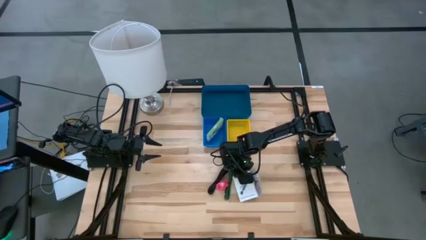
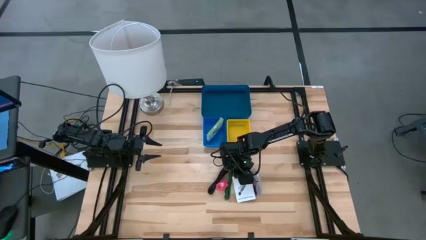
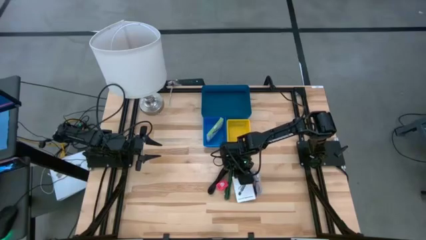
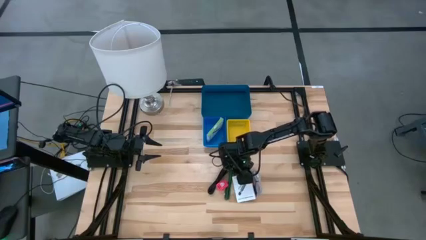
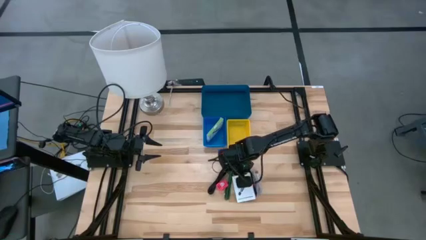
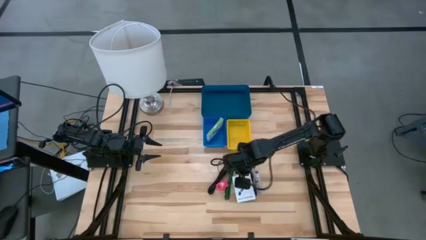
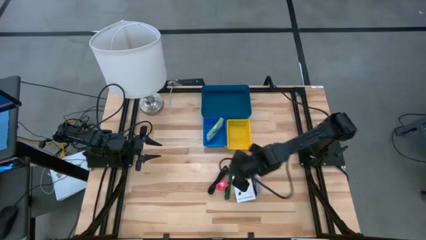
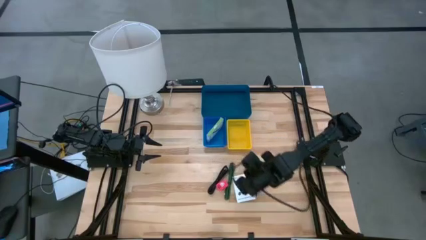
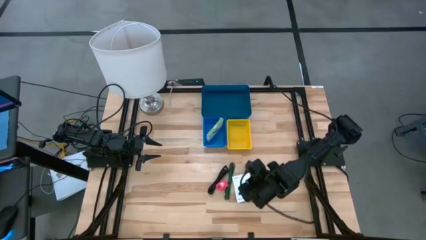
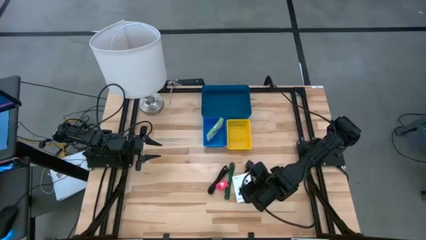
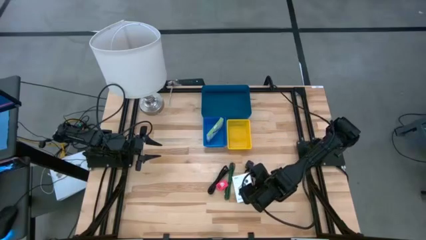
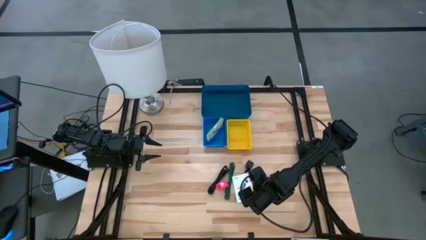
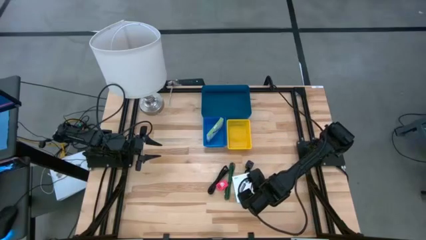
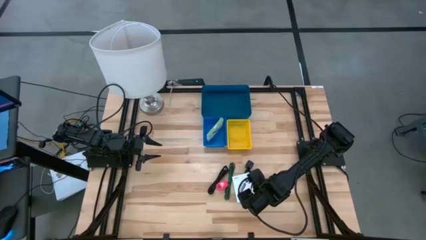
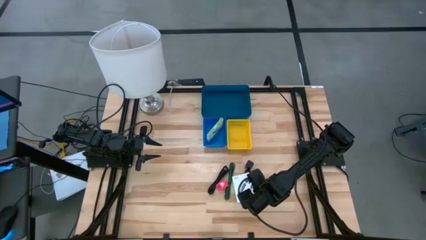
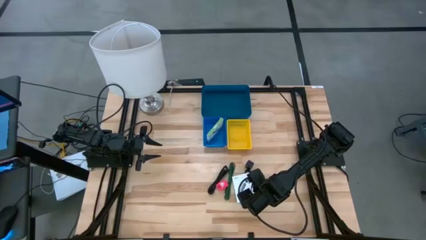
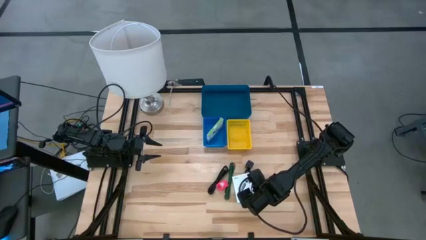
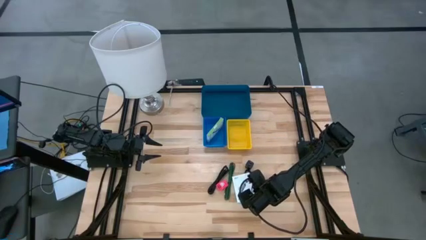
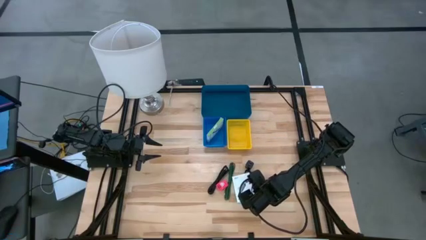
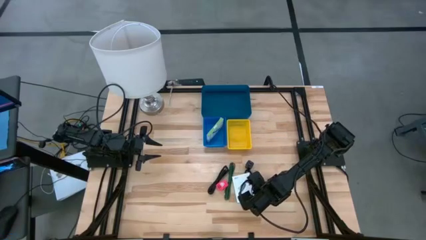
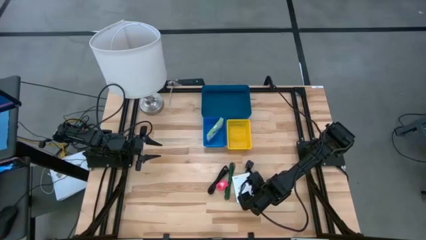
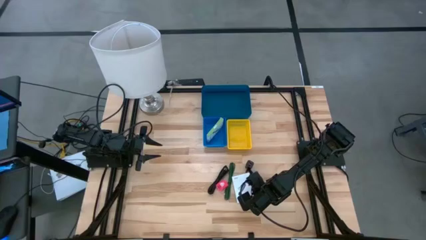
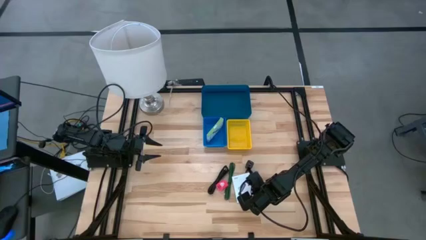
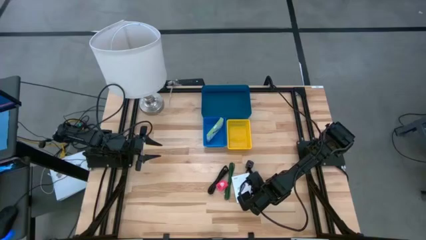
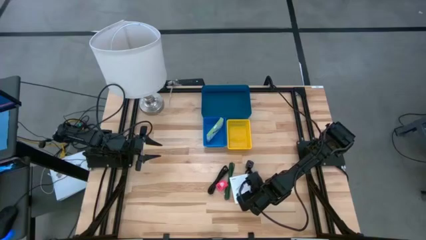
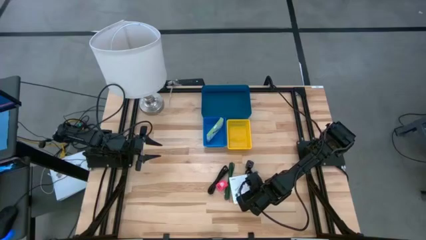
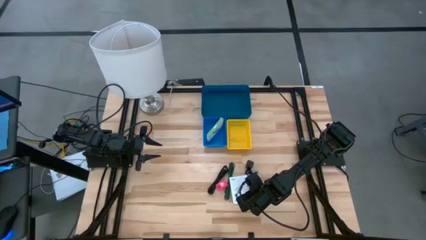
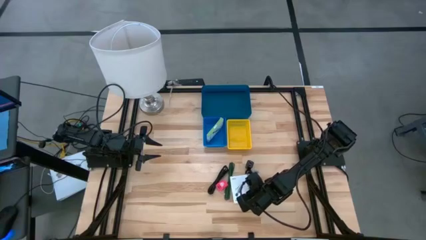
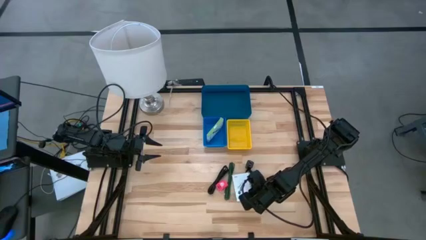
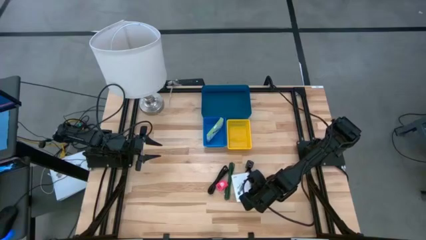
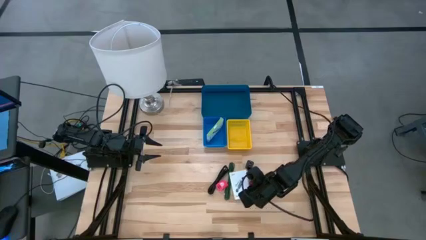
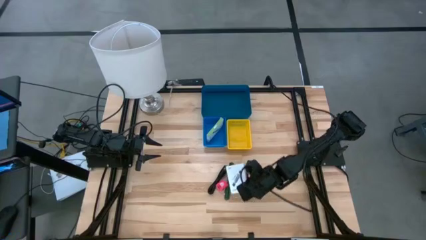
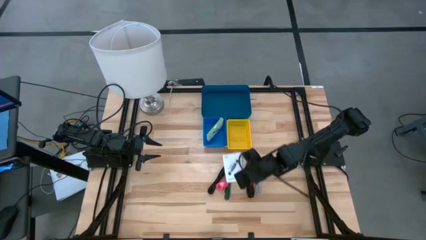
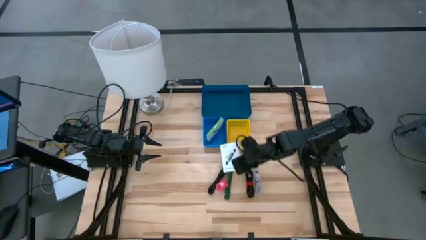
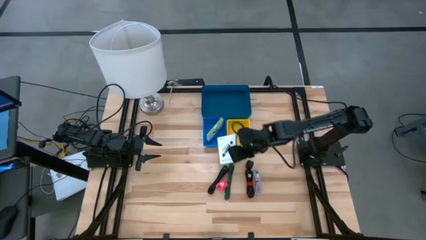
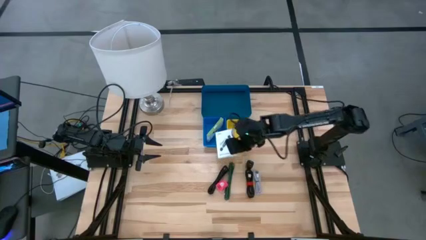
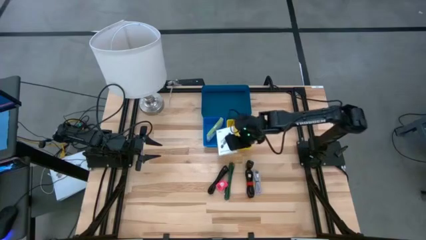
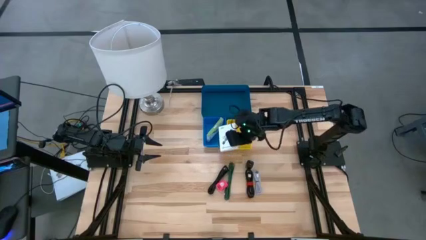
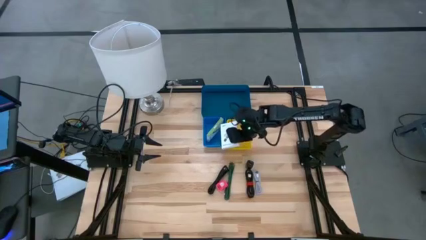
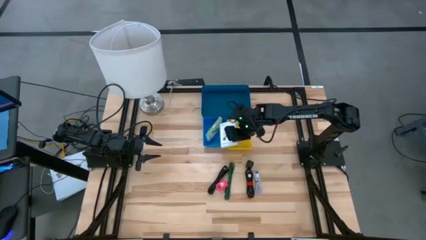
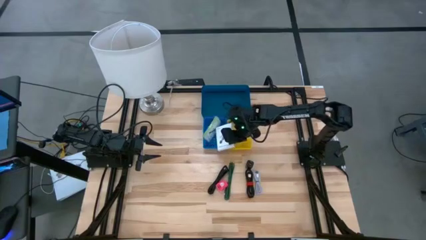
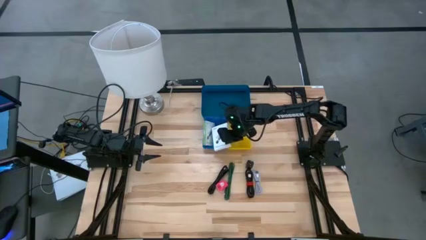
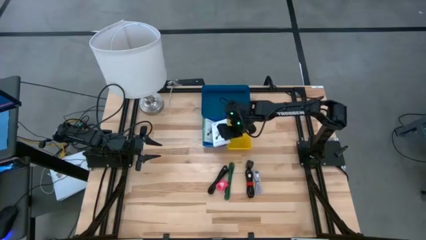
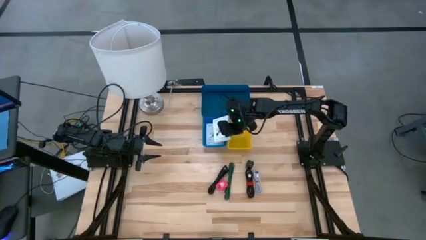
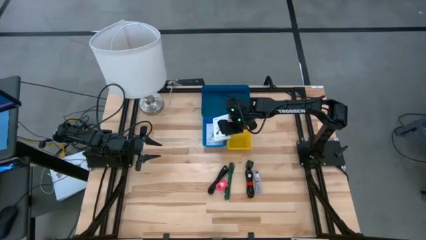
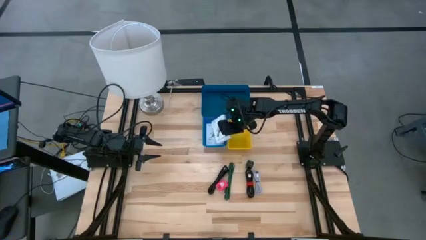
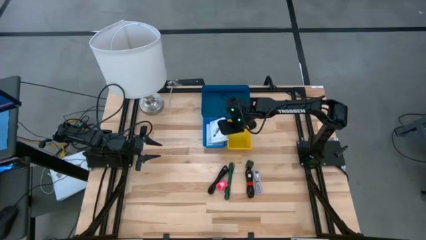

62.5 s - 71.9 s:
Task: Pick and place items into bin
Put the card reader box into the blue bin

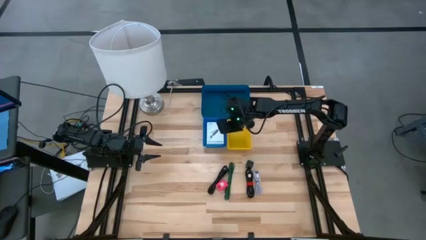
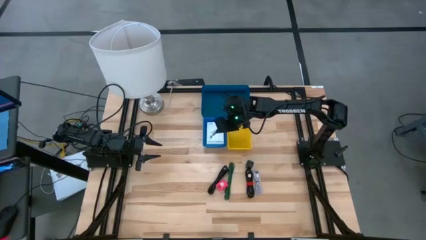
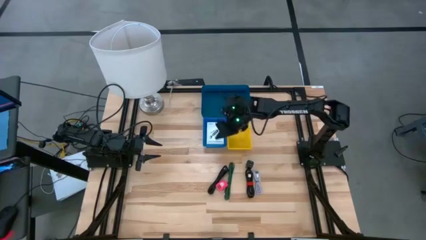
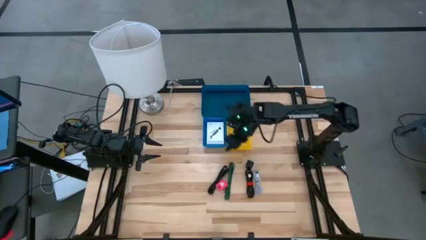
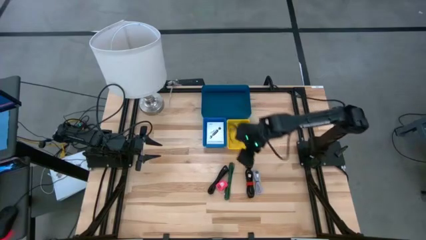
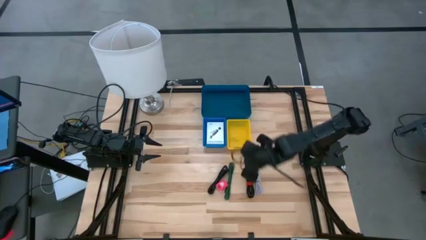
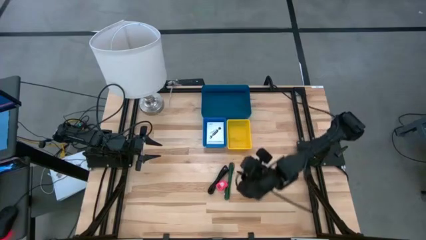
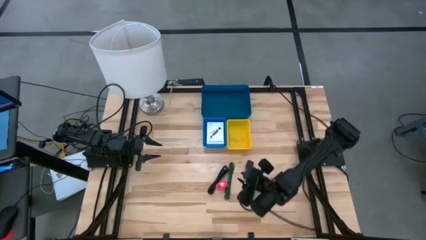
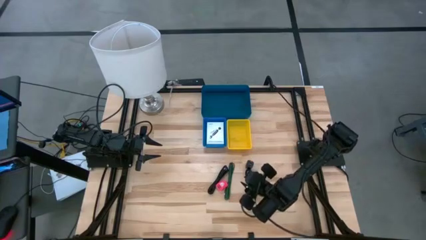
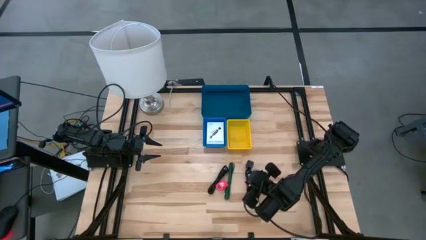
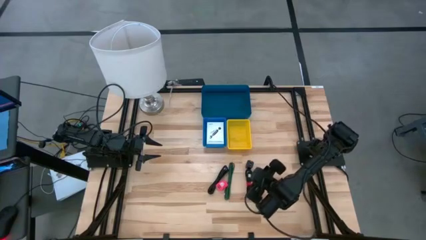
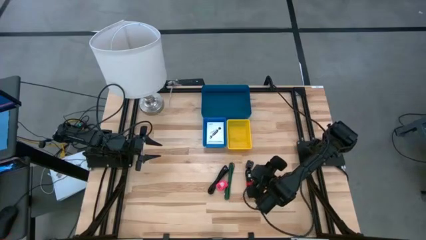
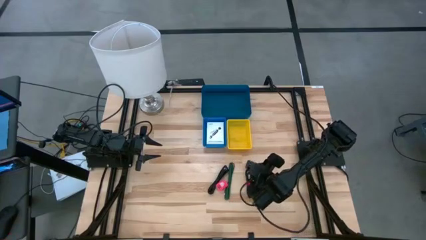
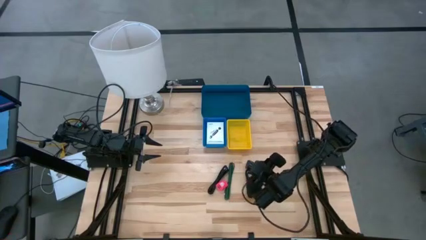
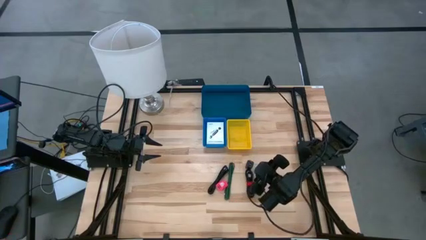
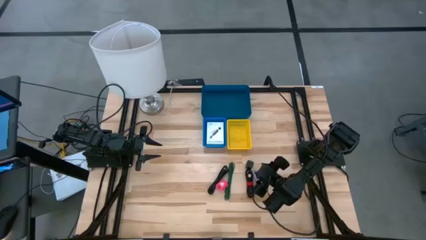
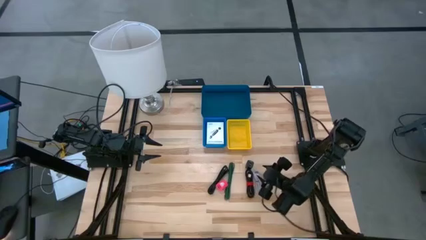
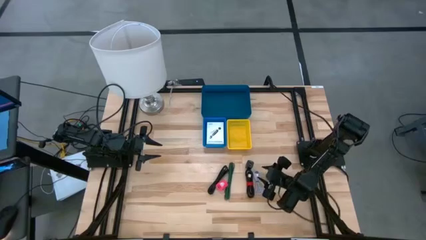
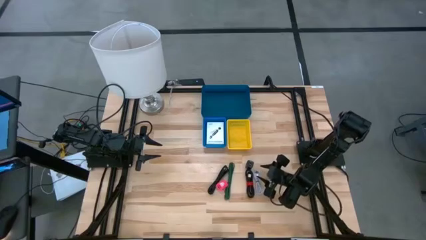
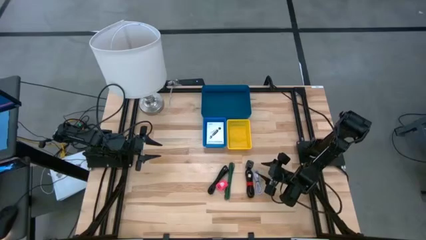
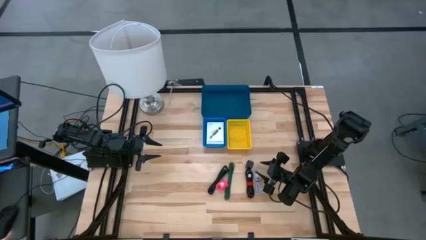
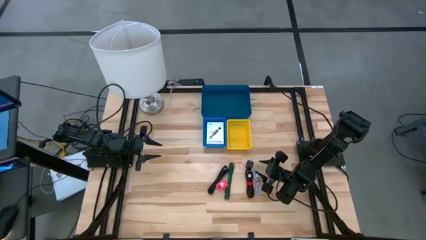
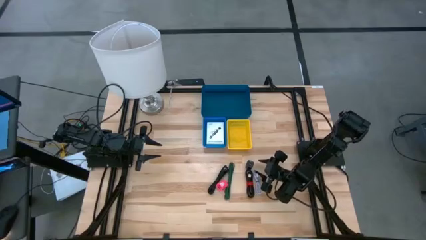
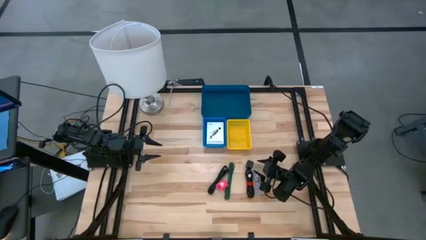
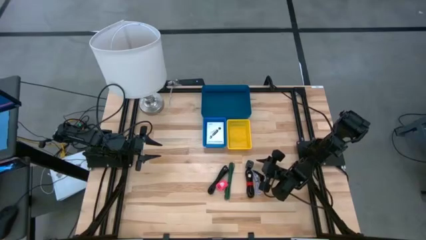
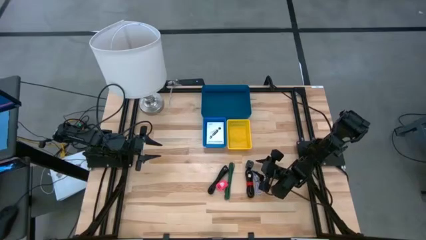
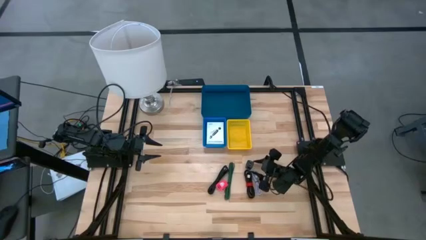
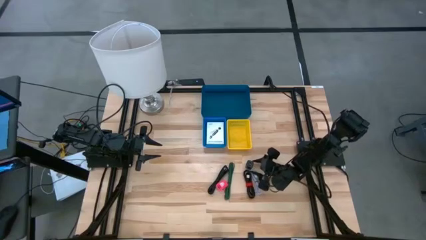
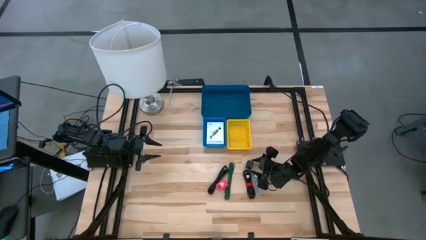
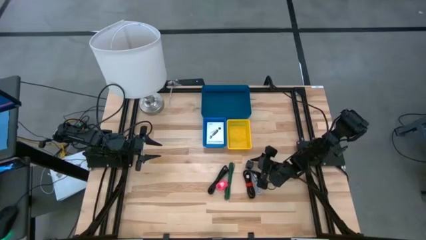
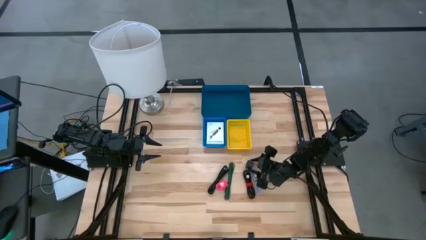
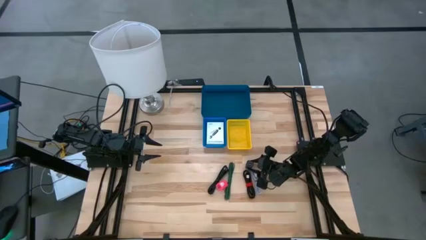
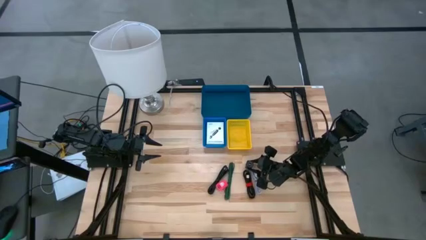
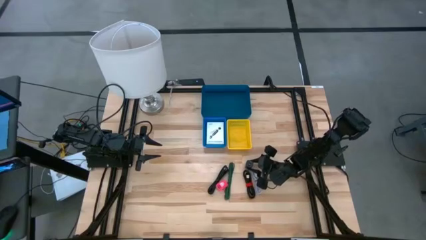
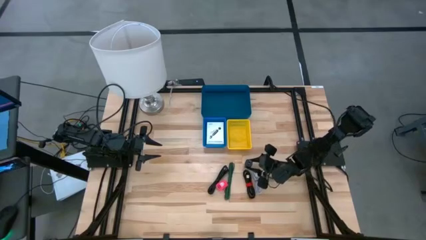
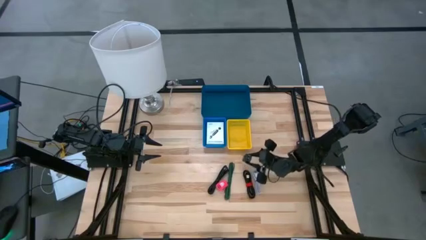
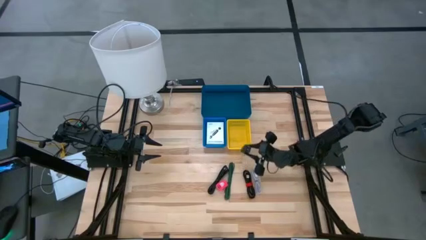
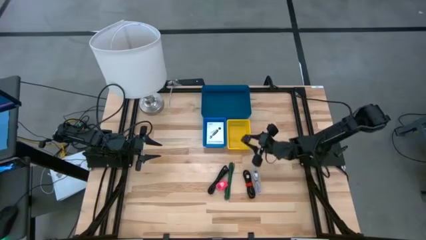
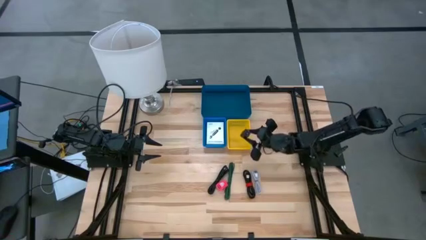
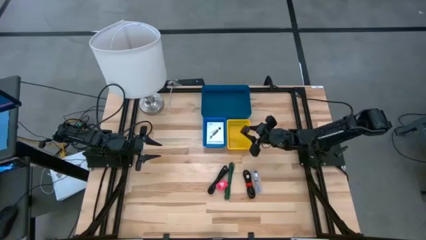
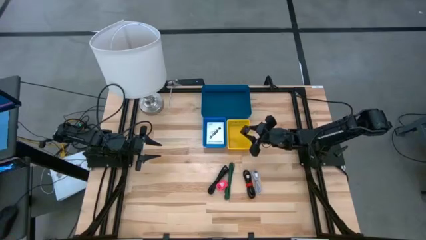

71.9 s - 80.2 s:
Put the black charger adapter into the yellow bin
